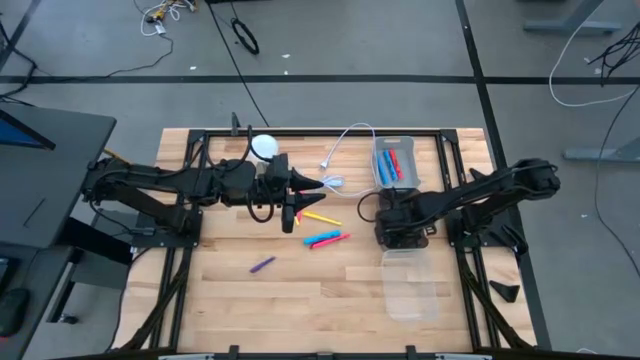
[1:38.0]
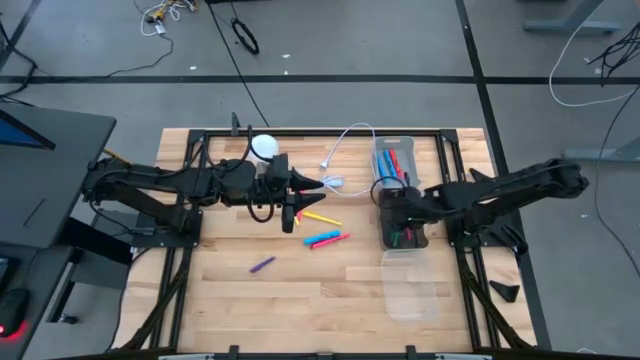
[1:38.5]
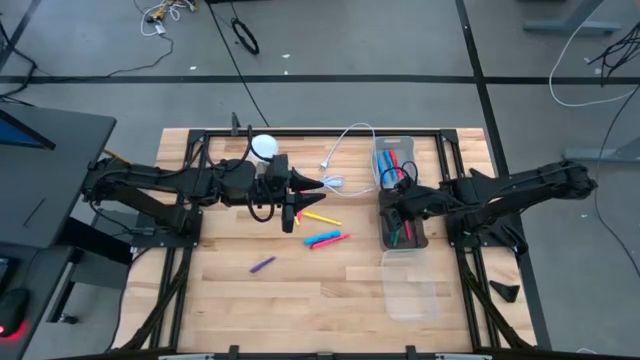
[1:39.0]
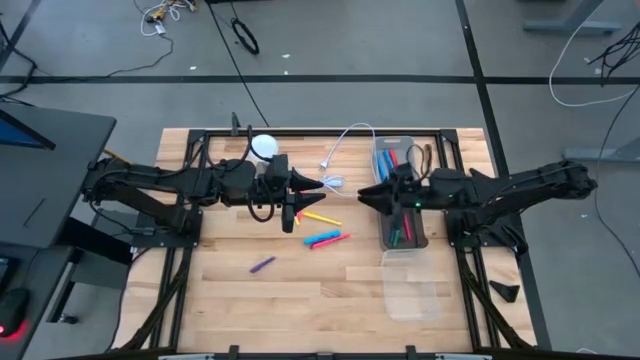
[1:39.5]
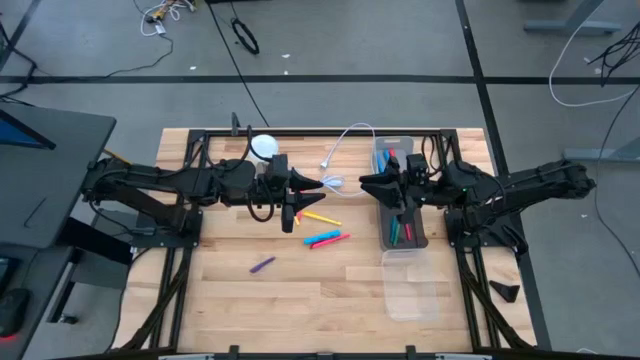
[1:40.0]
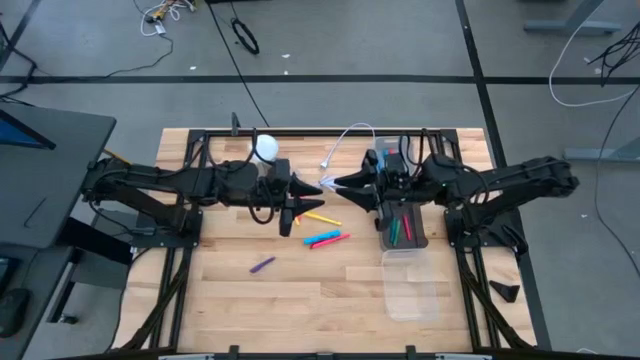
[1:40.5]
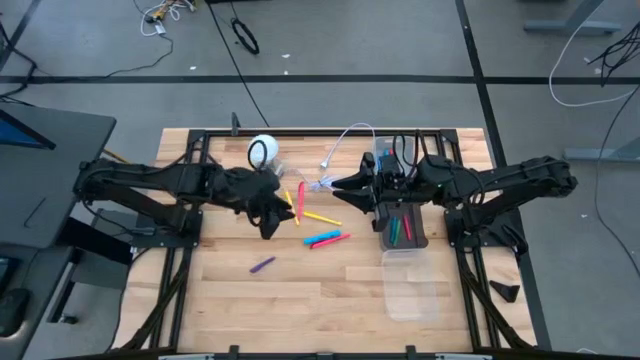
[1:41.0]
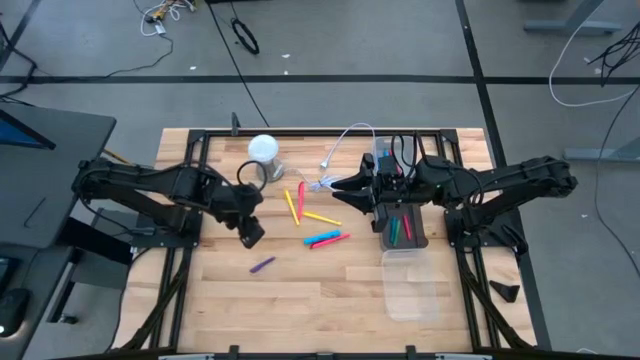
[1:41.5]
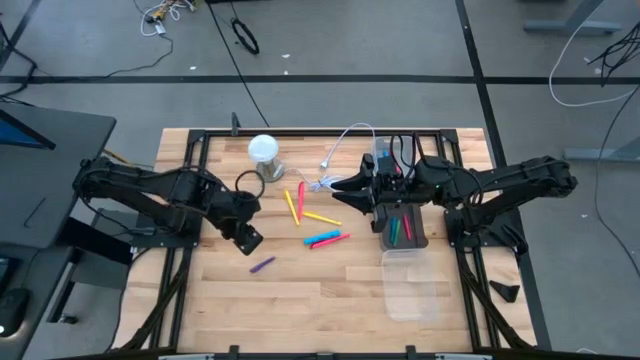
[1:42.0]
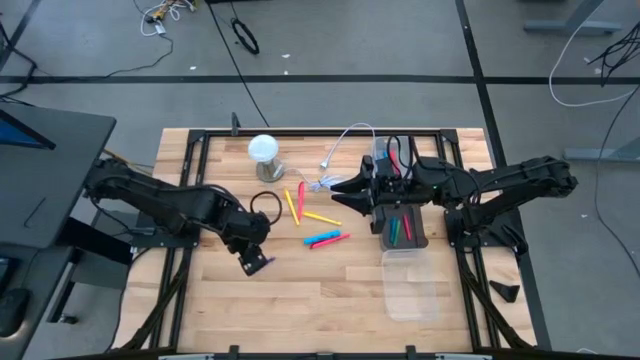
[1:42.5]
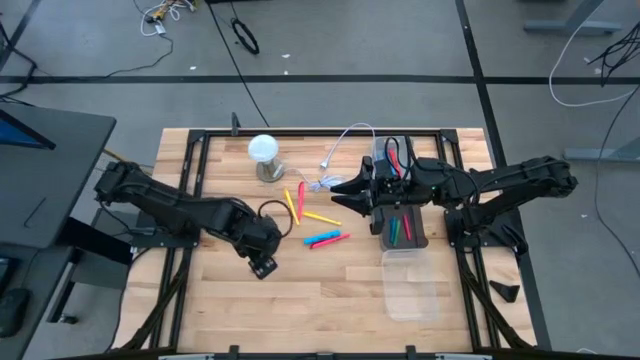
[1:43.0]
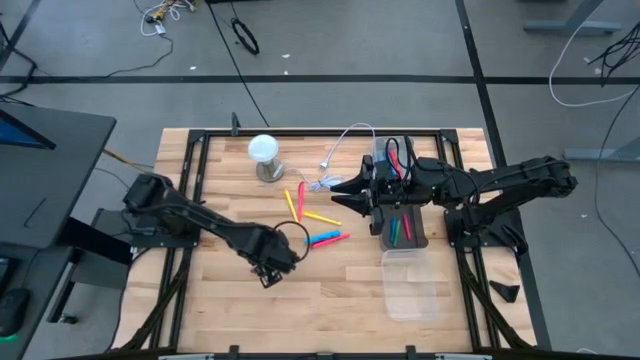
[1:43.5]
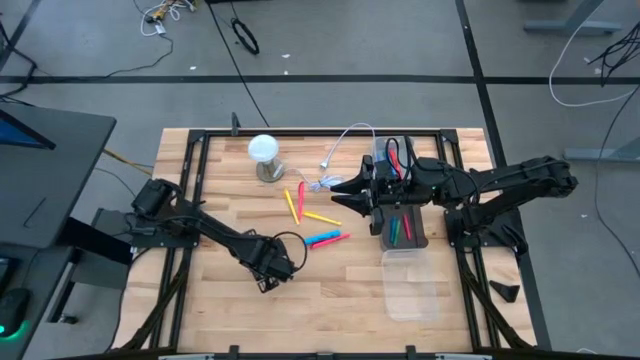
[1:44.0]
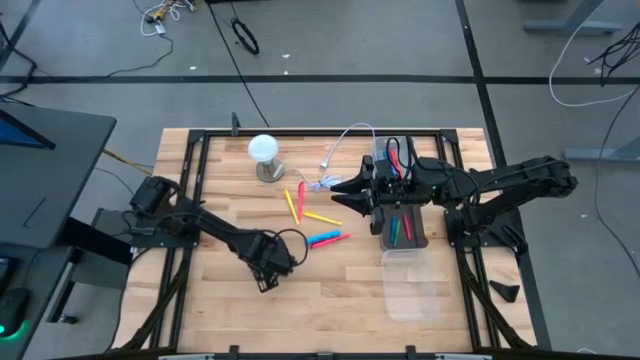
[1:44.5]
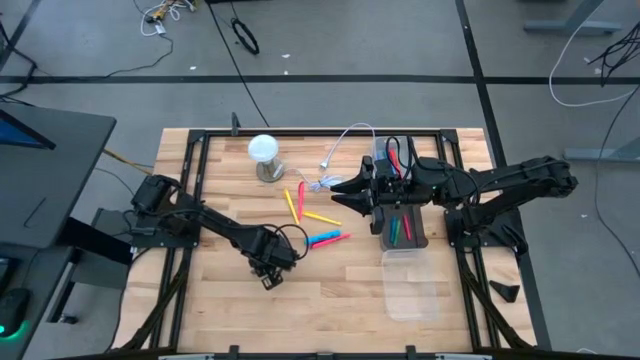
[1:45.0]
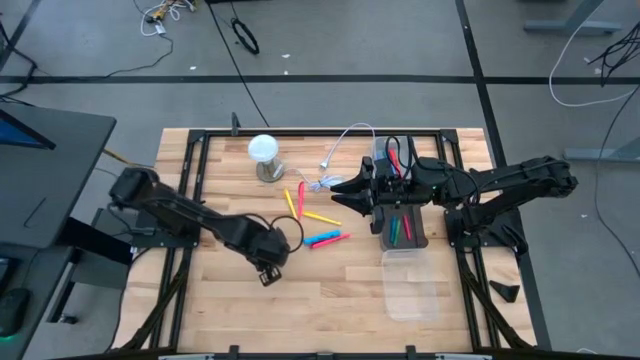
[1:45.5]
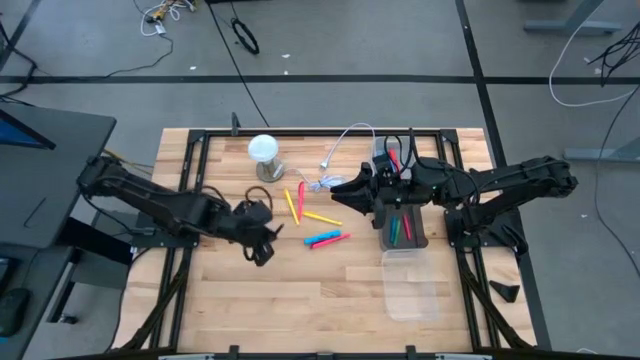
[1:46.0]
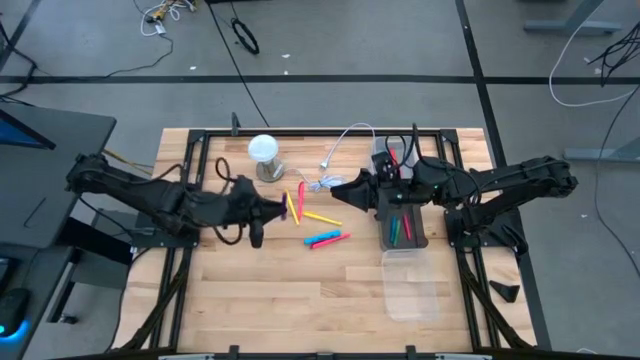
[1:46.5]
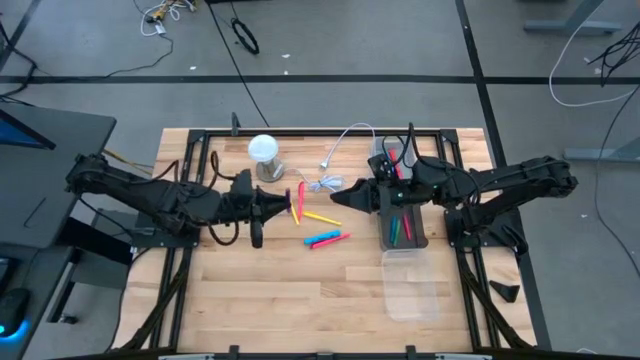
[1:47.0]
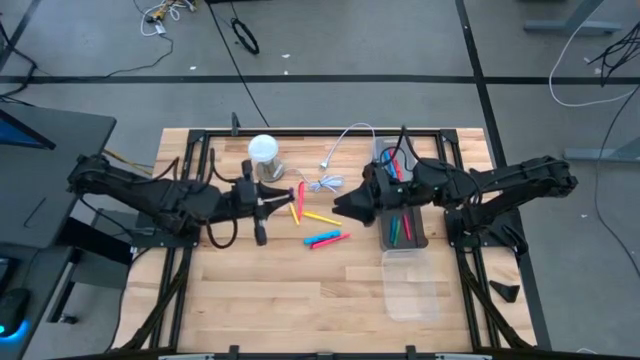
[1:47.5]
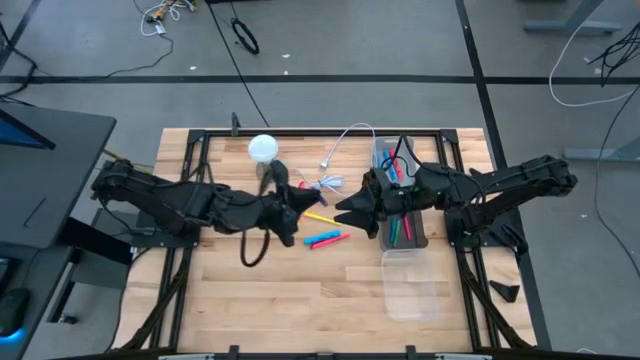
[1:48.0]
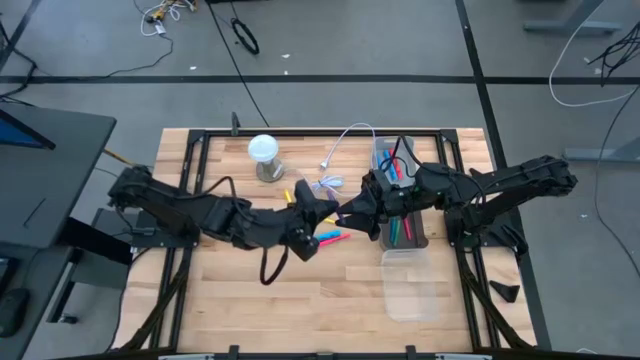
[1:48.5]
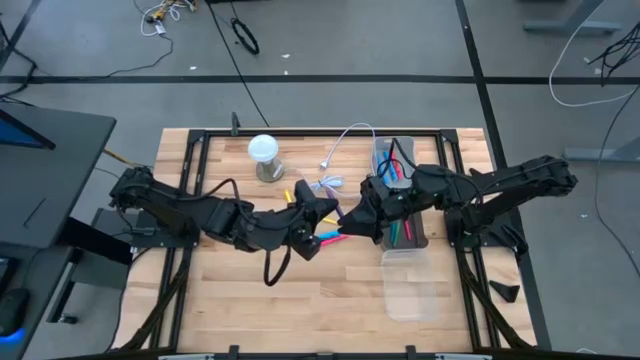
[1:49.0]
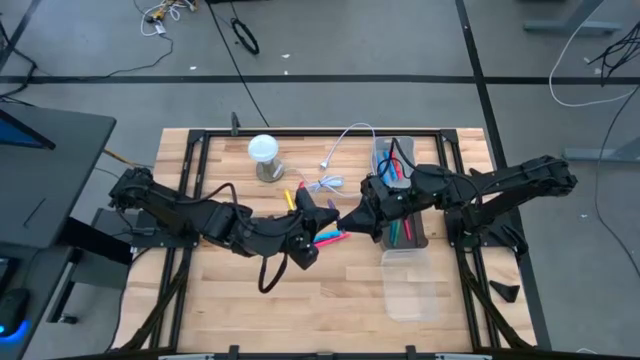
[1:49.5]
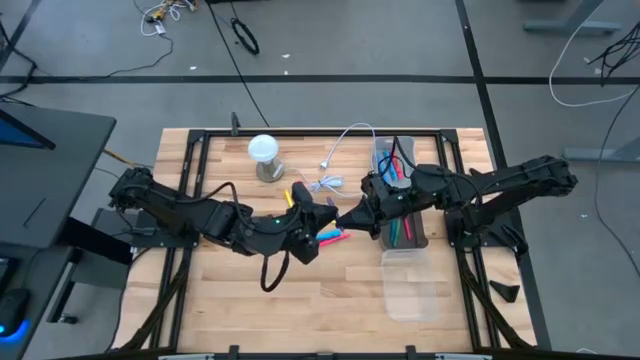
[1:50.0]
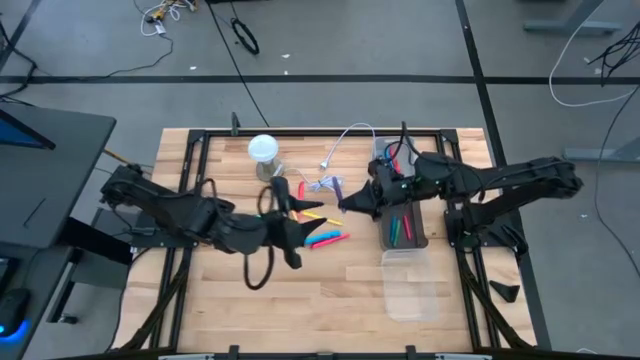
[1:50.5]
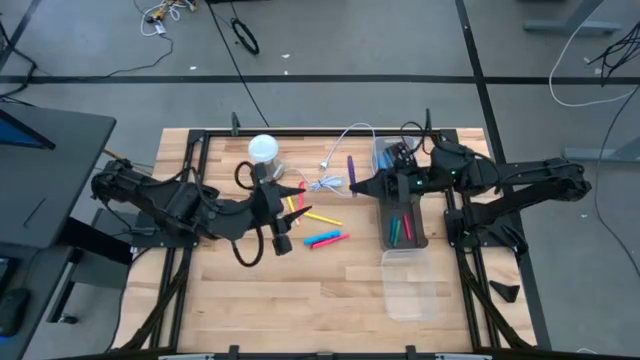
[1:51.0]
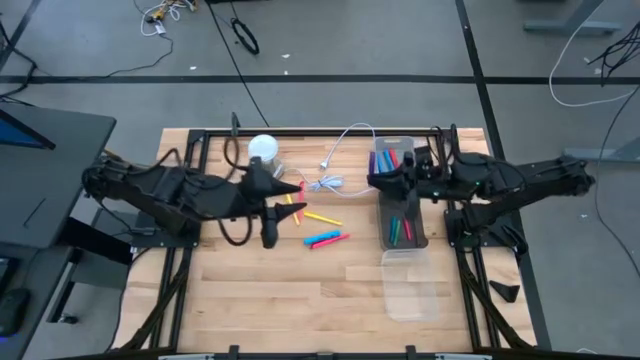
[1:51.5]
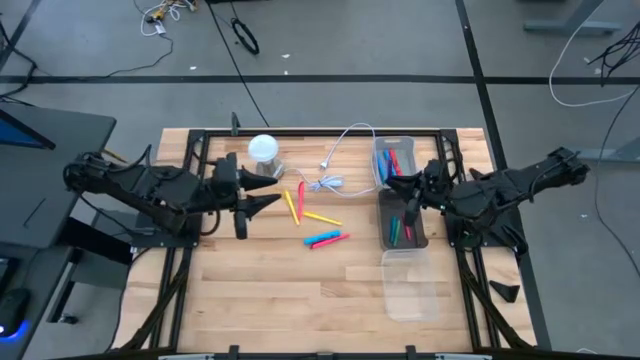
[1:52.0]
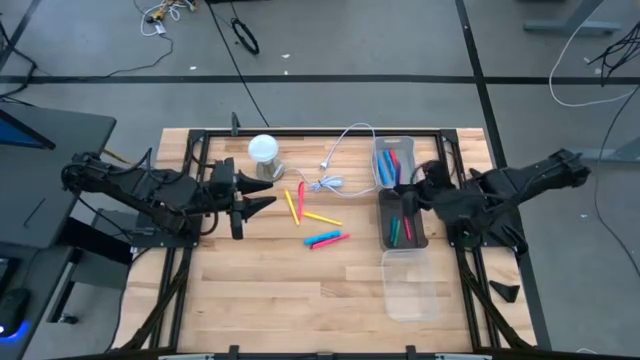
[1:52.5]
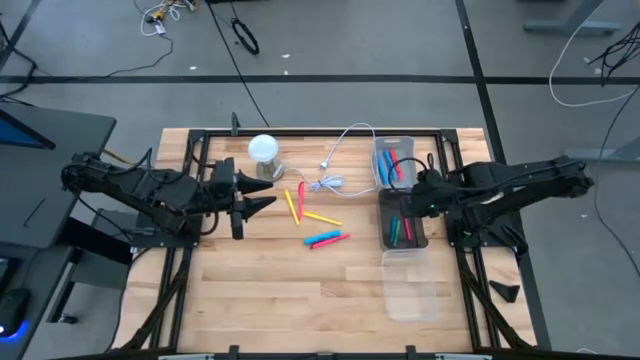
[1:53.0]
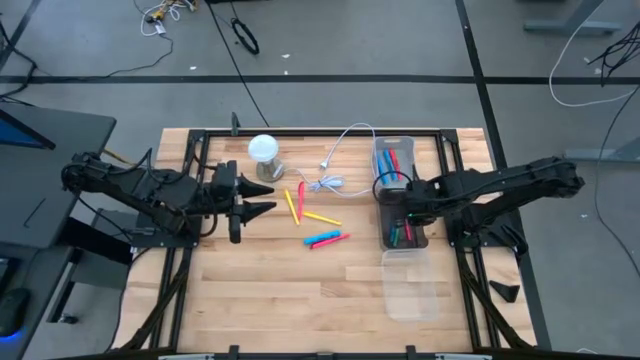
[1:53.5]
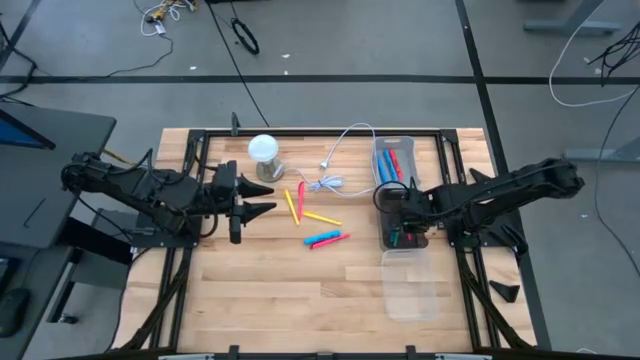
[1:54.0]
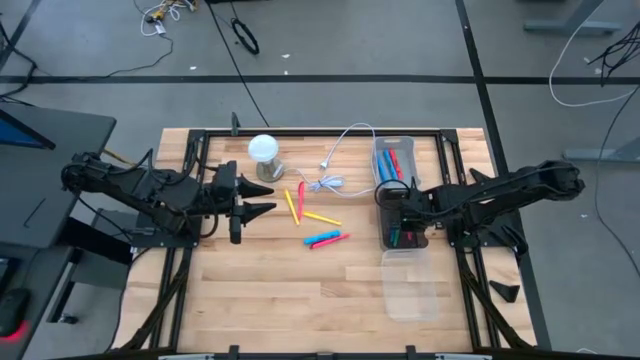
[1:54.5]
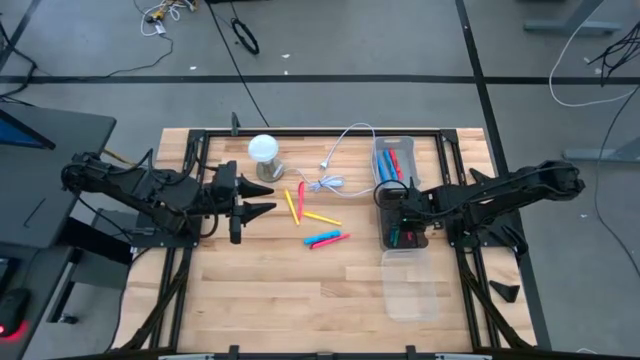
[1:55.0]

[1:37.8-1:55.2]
Task: Pick & Place Markers
Put the violet mini marker into the black bin

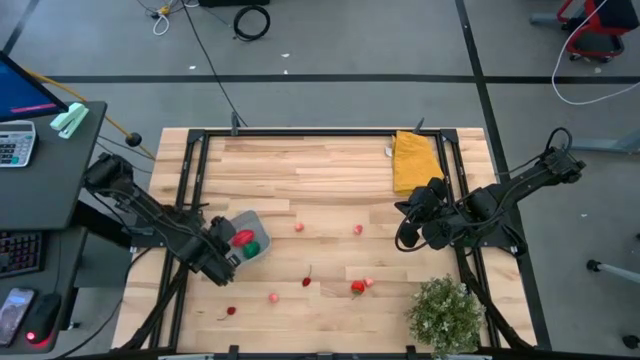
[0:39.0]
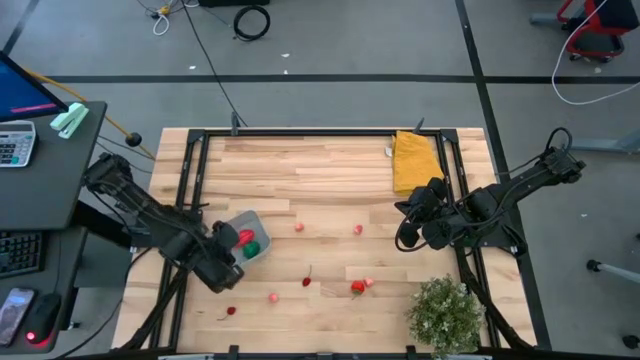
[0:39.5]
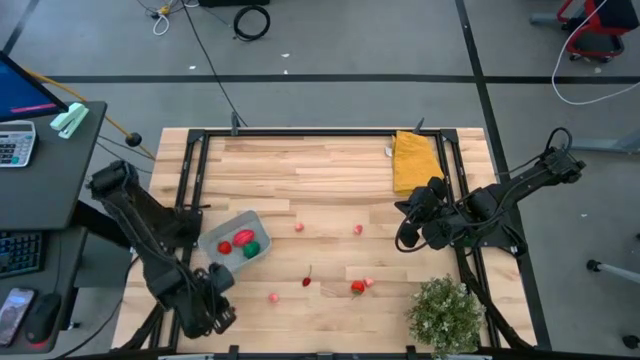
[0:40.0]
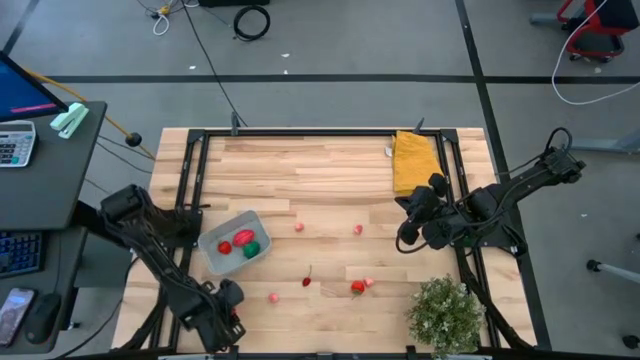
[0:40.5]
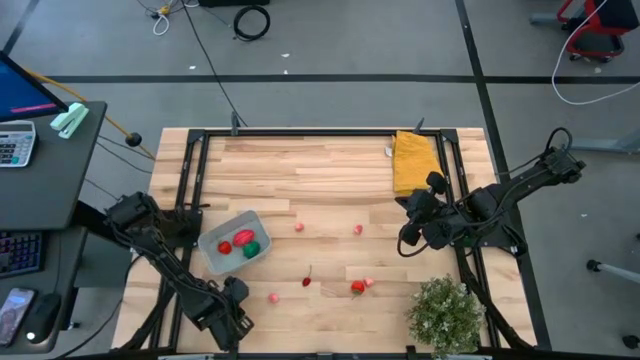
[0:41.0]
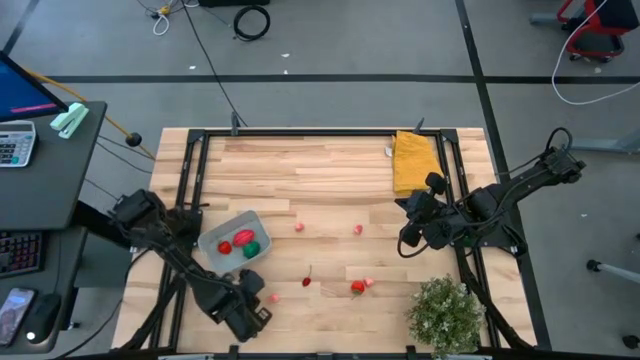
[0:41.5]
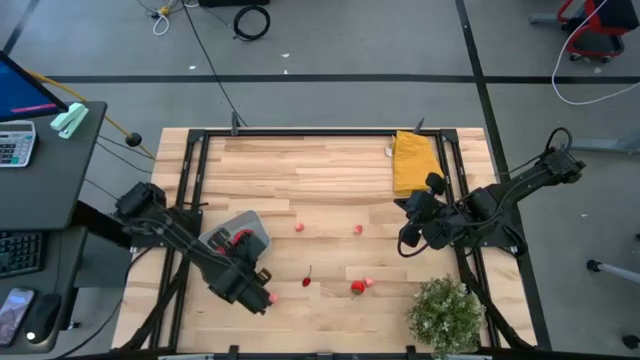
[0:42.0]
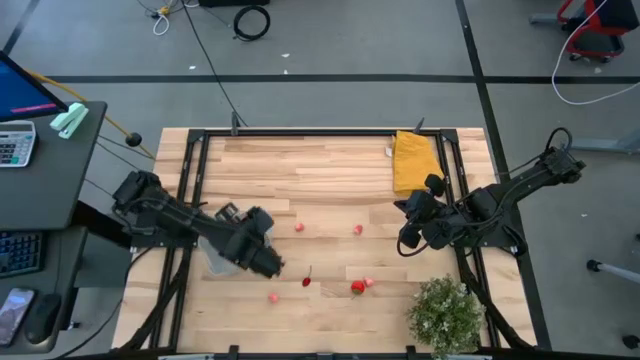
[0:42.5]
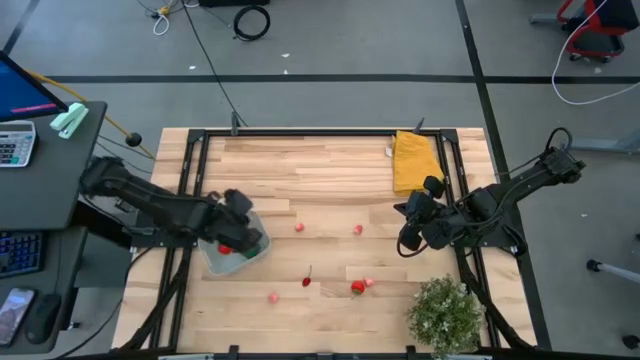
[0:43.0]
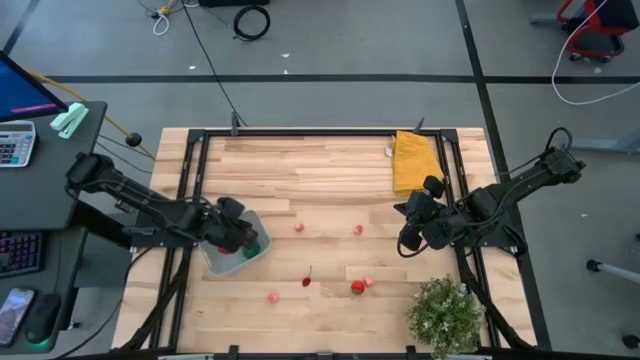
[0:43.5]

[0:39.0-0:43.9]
Task: Pick and placing Produce into tupperware
Put the left red cherry into the gray bin
